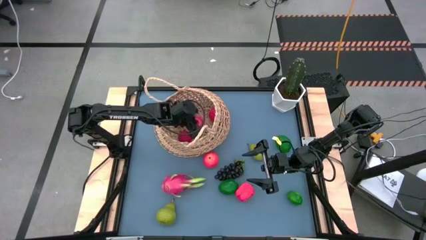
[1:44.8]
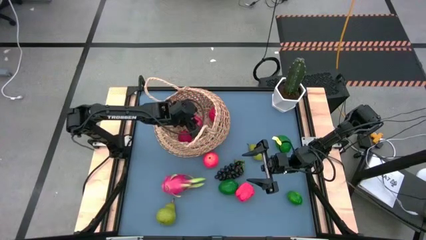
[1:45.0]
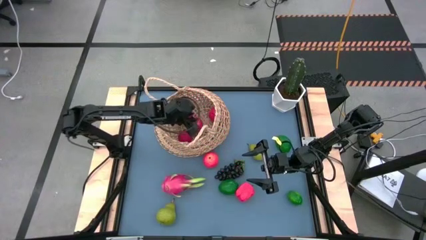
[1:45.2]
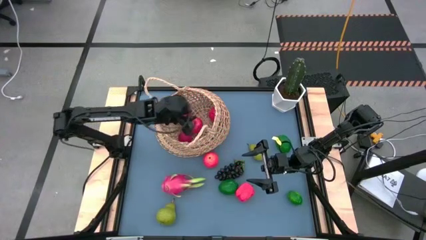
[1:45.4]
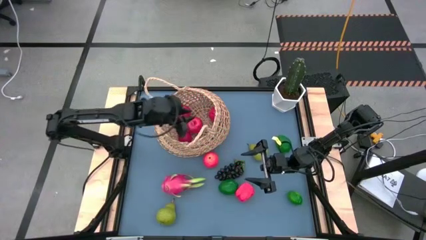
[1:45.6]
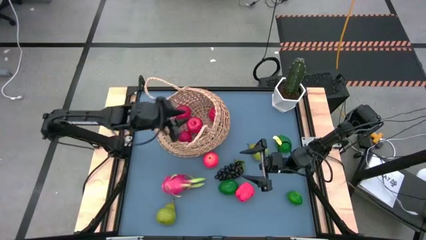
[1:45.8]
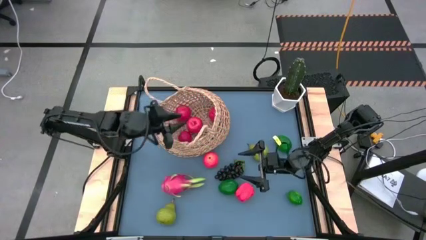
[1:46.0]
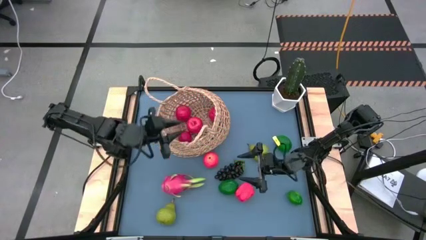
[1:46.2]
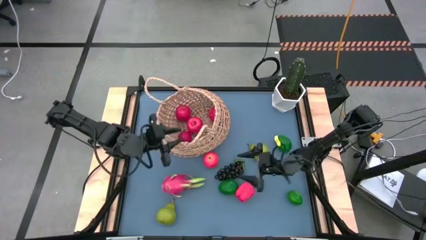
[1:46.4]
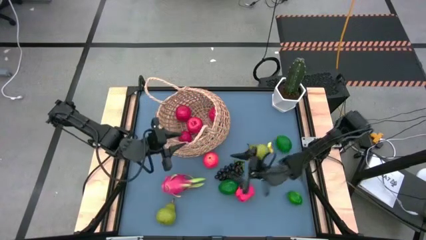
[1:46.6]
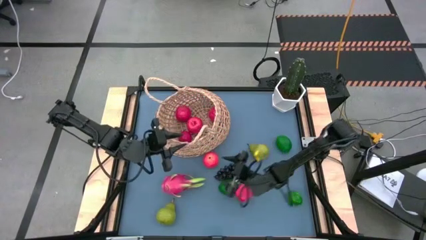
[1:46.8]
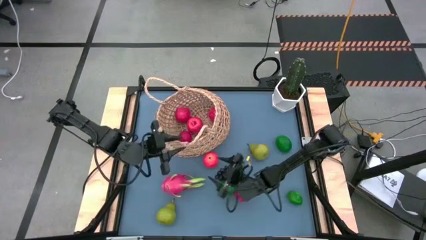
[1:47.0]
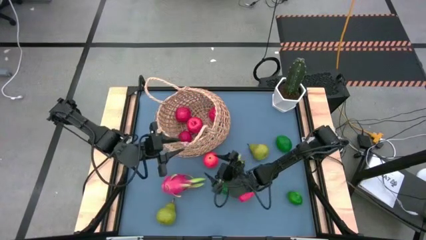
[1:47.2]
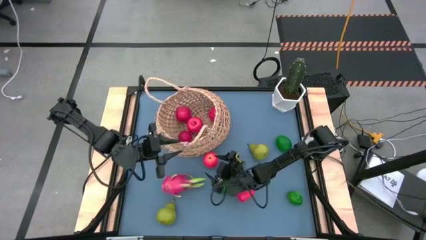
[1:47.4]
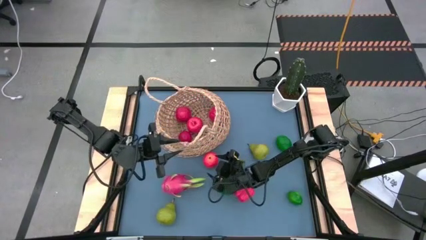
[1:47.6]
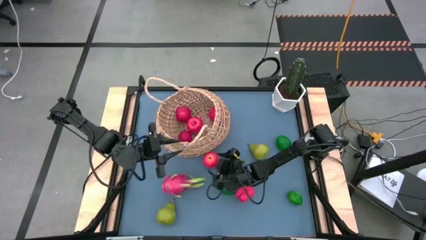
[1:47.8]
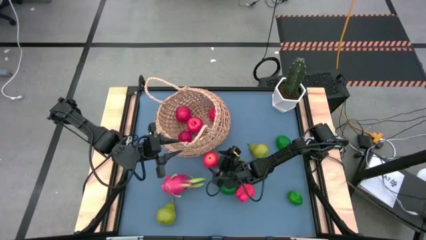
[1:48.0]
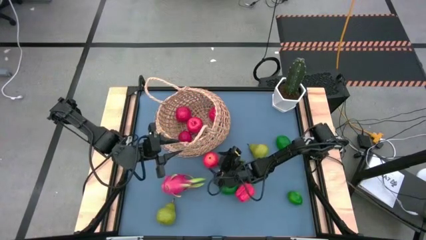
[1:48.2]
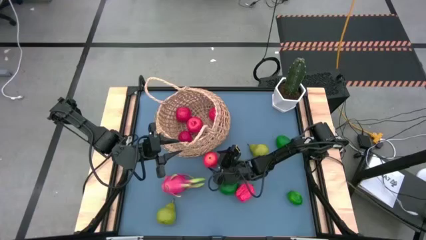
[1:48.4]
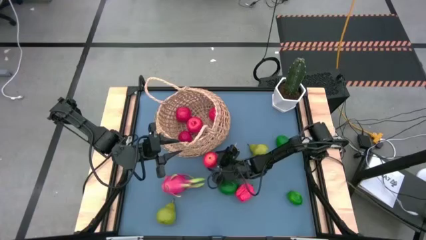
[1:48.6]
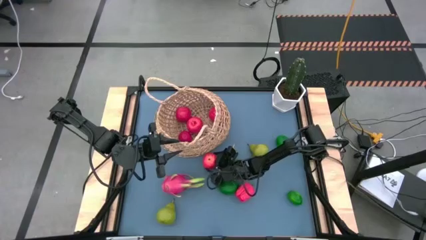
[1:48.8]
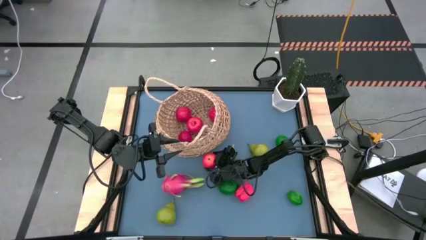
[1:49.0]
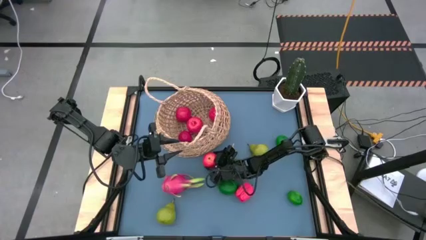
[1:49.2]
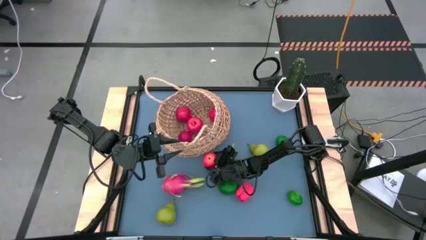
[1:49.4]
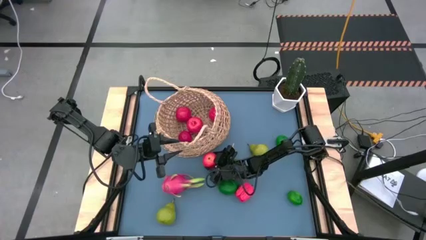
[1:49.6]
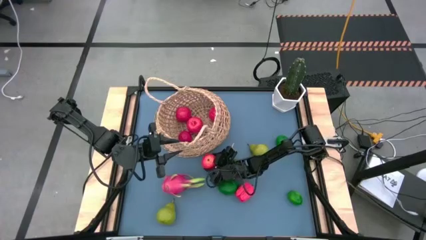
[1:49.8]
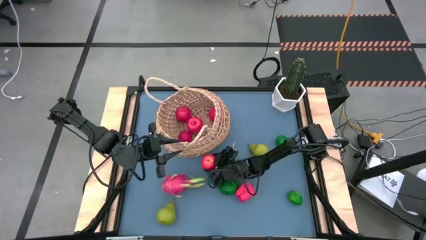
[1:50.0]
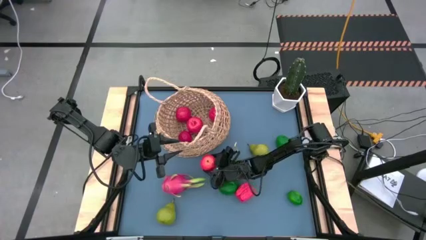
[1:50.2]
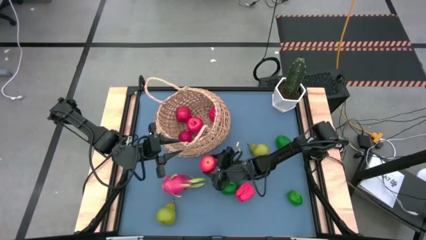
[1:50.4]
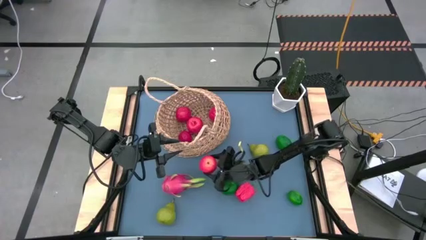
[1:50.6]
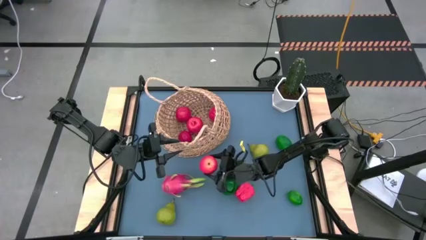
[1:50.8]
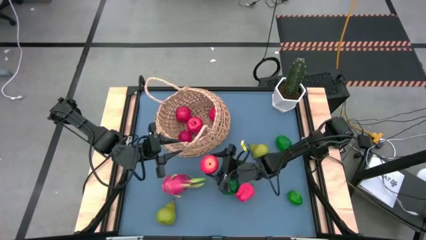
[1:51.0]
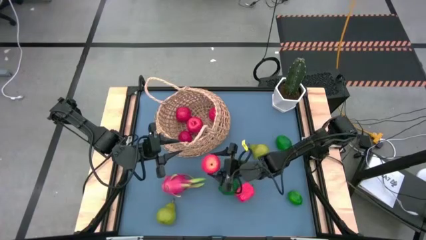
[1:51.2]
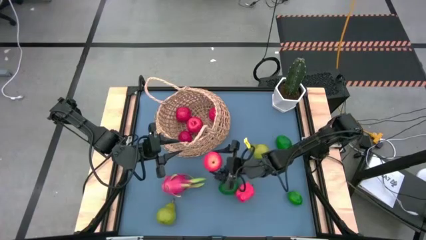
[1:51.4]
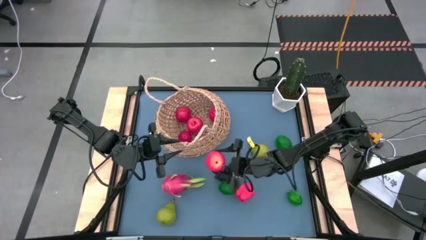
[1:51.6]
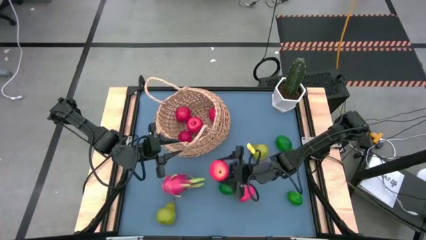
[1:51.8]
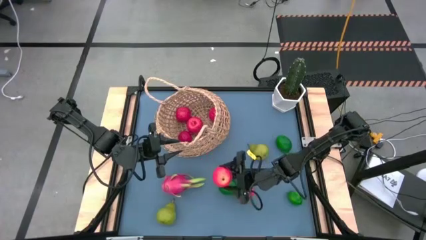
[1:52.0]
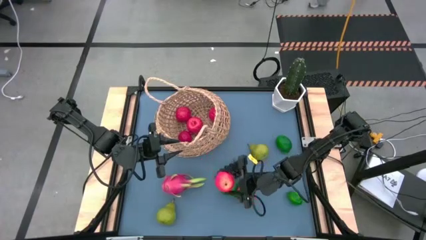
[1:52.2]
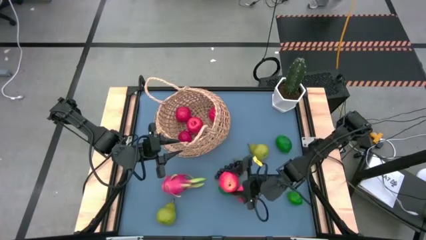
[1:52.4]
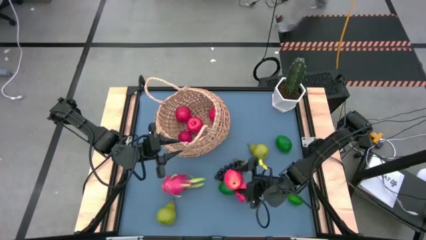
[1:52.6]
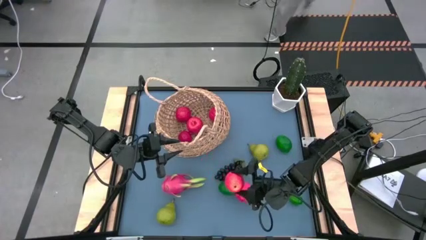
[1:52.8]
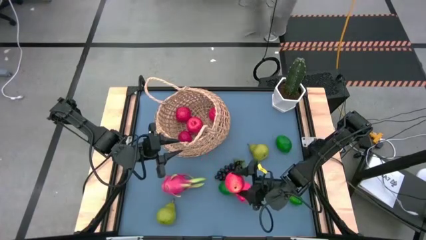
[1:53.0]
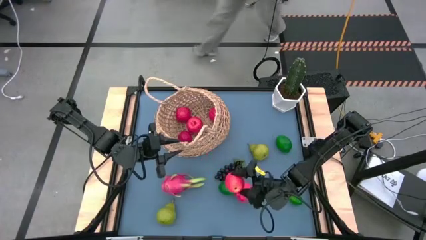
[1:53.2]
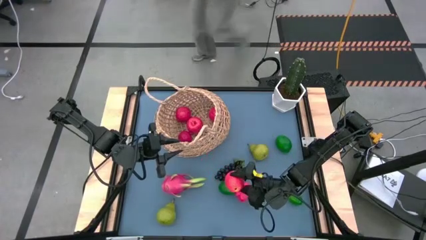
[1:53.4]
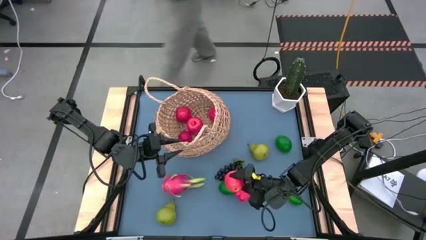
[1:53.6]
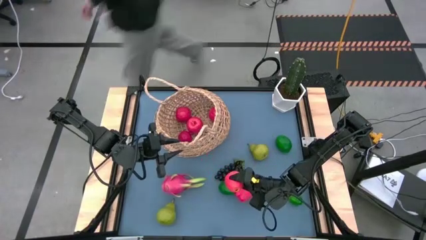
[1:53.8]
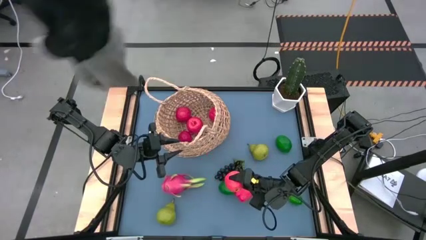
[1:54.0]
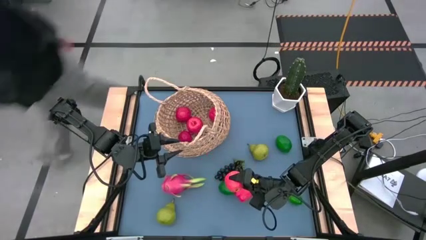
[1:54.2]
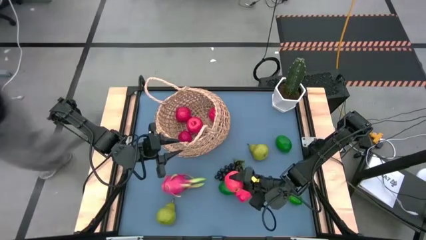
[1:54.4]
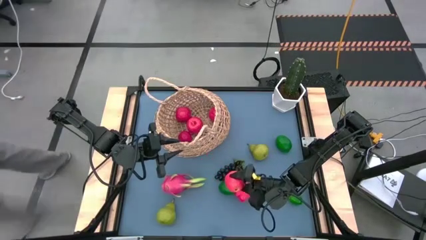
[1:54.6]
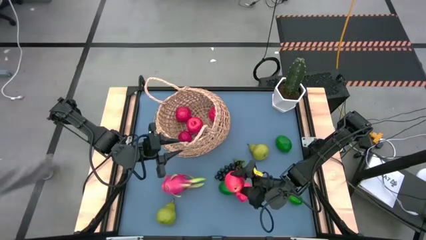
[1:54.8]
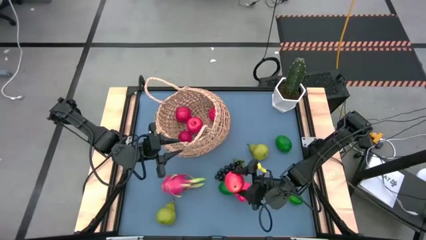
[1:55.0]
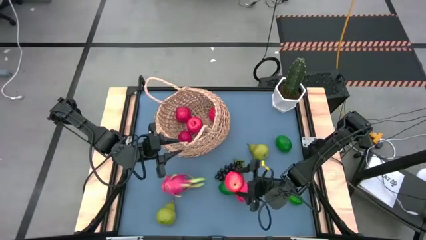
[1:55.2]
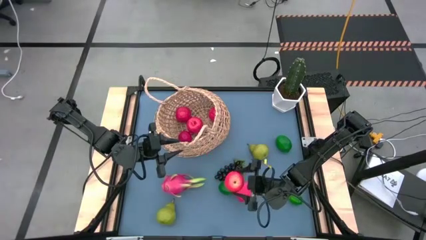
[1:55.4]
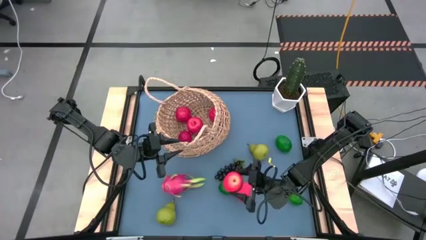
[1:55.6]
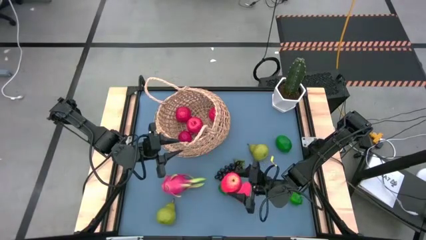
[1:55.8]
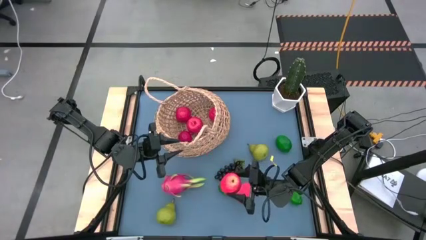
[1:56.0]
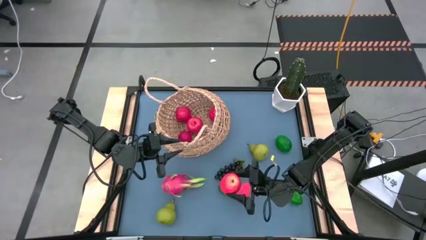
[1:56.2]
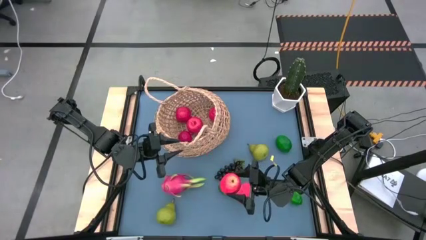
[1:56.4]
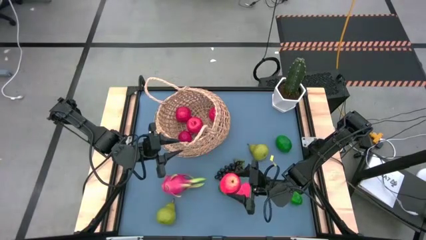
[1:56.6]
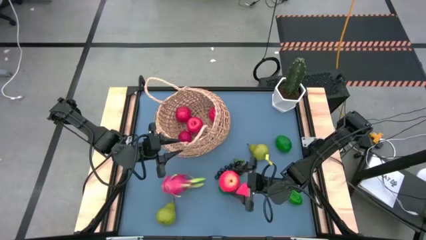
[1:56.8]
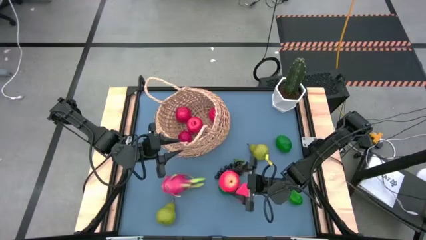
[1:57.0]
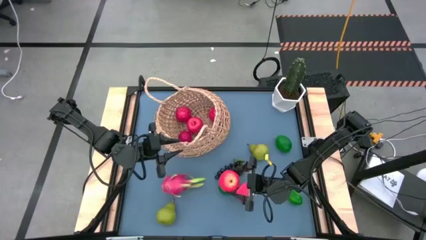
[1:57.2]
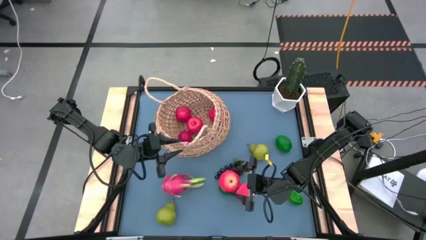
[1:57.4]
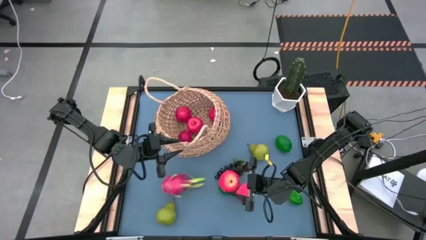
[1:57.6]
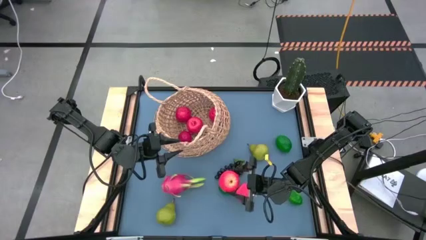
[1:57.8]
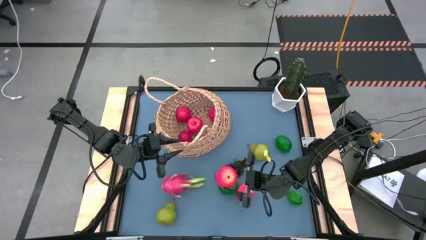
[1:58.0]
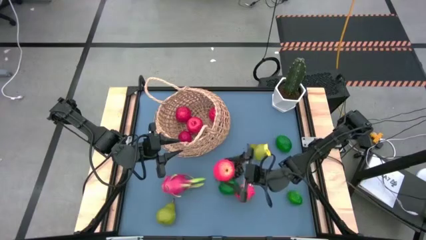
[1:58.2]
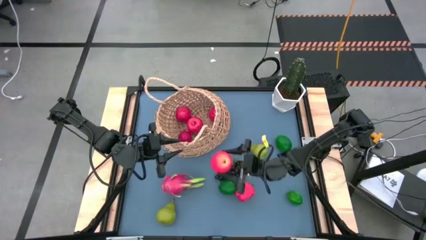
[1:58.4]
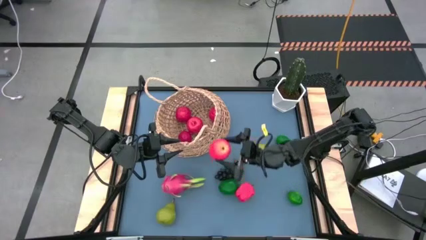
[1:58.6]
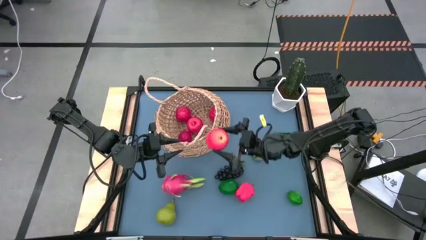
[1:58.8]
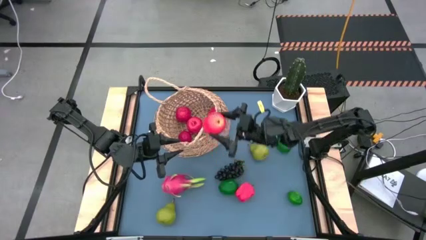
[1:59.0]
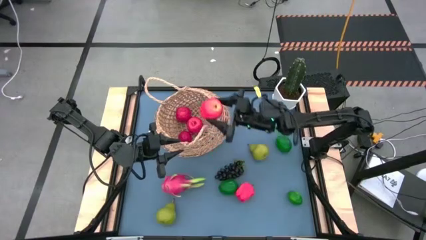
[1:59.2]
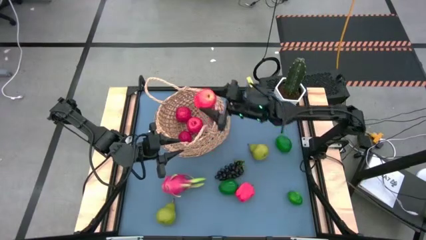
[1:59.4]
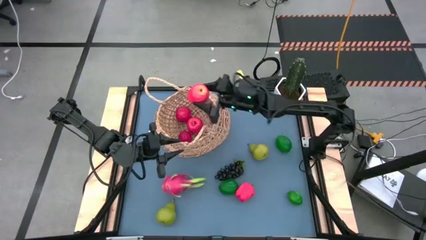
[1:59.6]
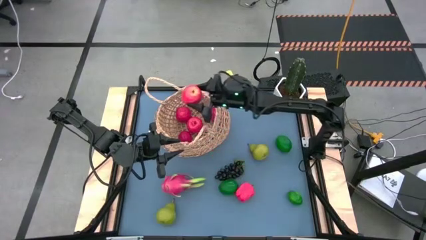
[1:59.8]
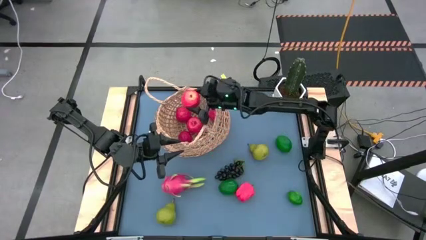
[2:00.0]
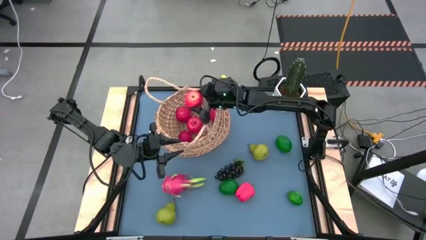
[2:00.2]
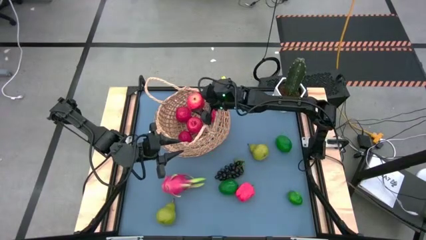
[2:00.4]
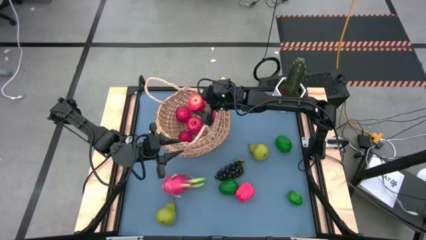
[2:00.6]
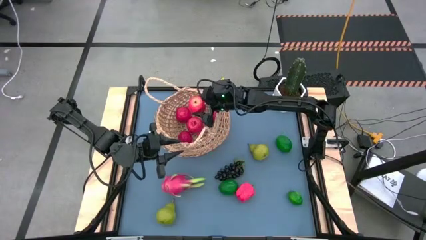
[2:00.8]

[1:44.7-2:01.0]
Task: Build produce basket
Put the red apple into the basket
